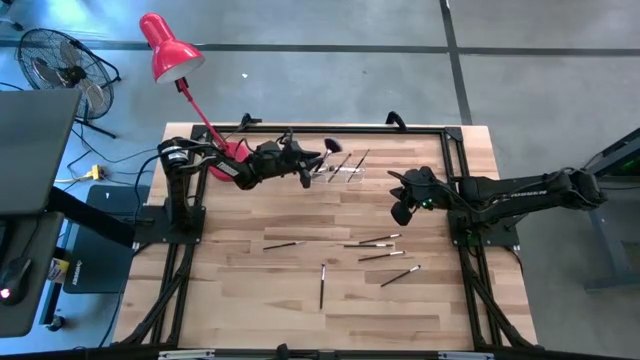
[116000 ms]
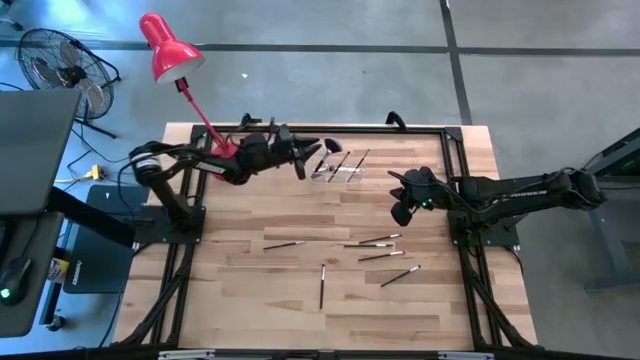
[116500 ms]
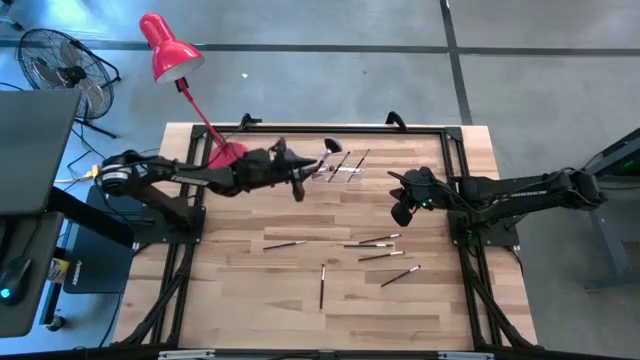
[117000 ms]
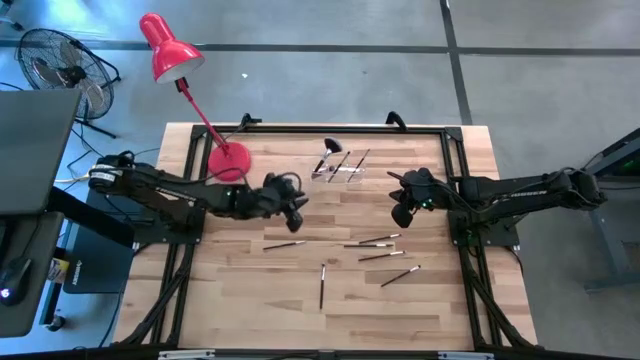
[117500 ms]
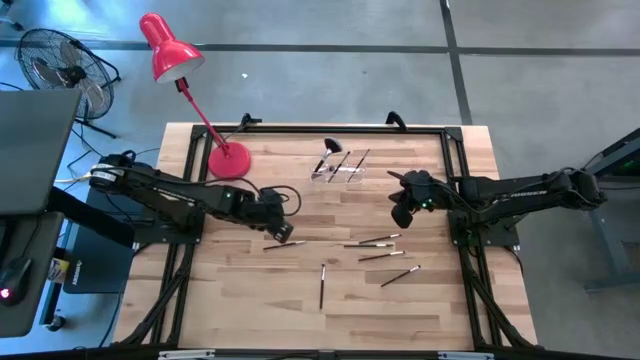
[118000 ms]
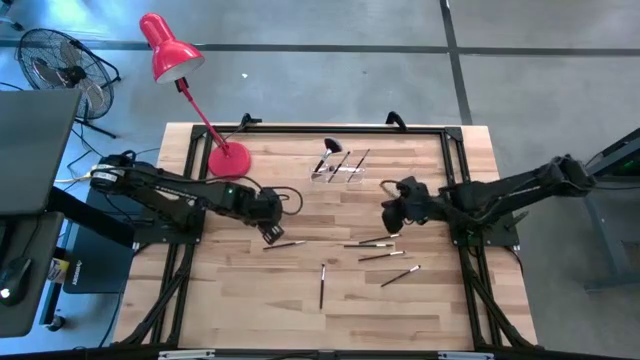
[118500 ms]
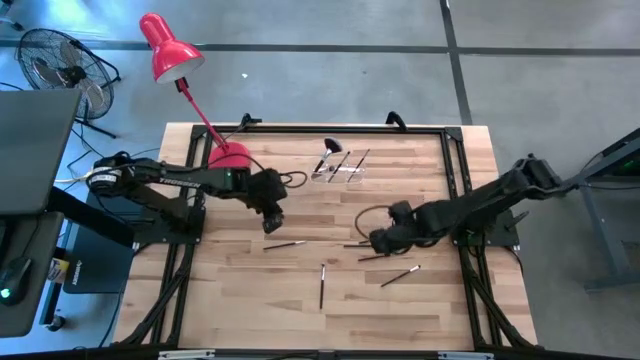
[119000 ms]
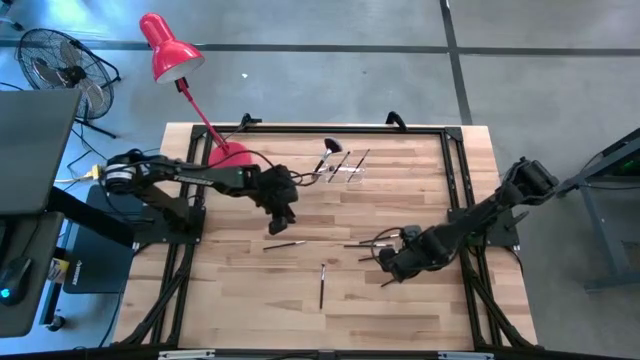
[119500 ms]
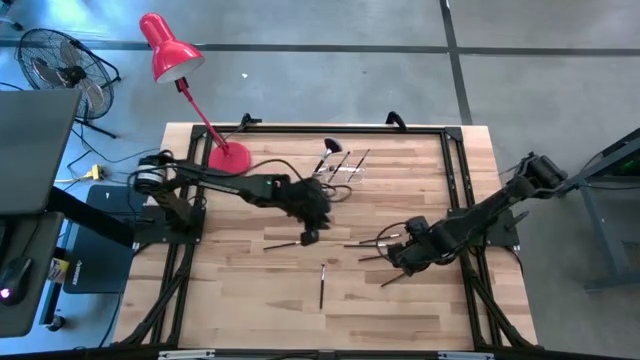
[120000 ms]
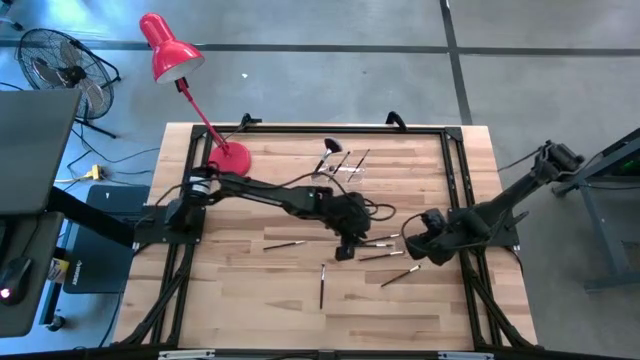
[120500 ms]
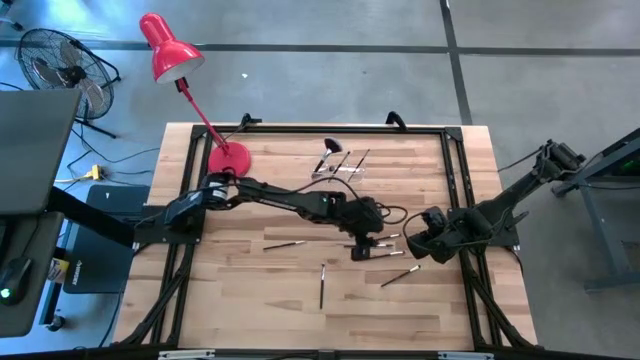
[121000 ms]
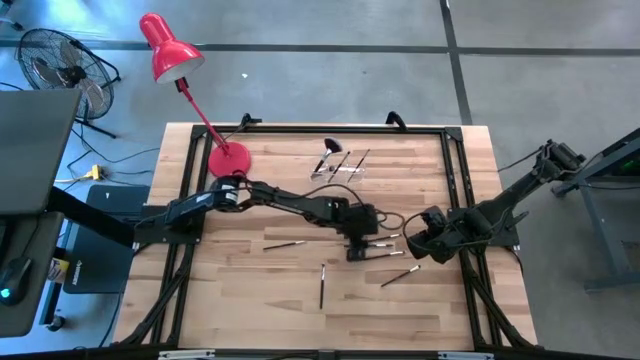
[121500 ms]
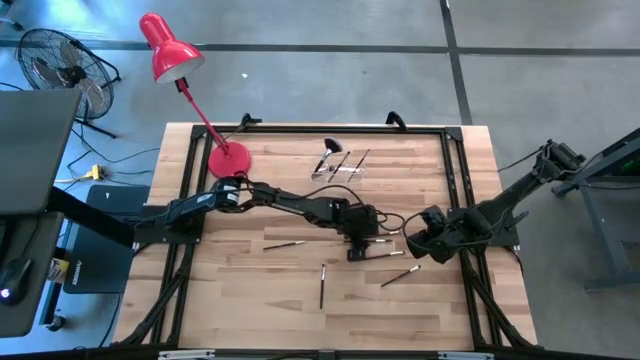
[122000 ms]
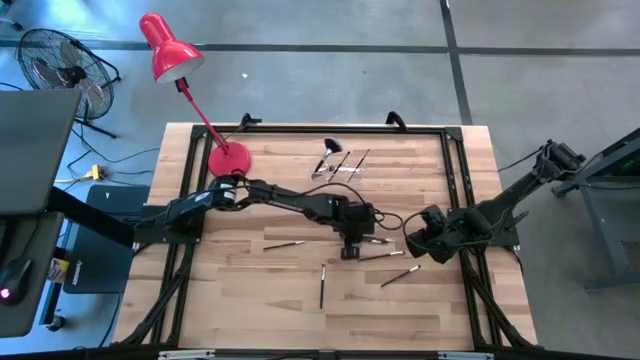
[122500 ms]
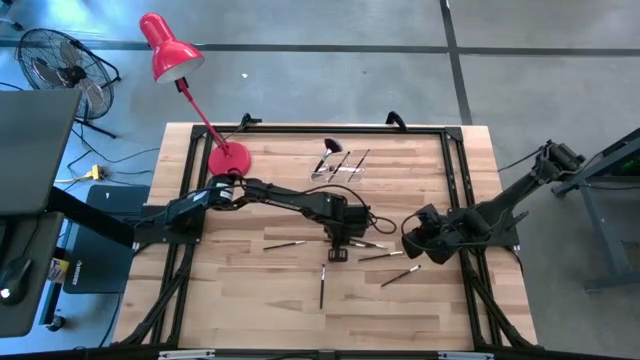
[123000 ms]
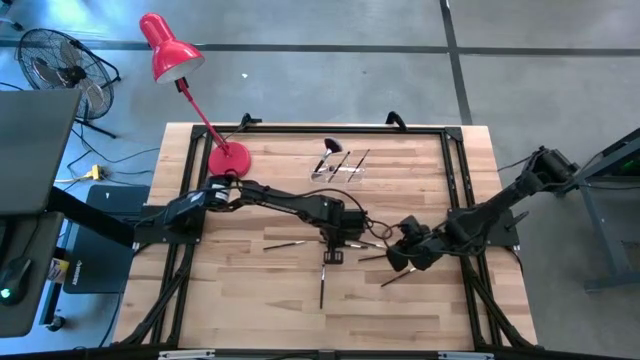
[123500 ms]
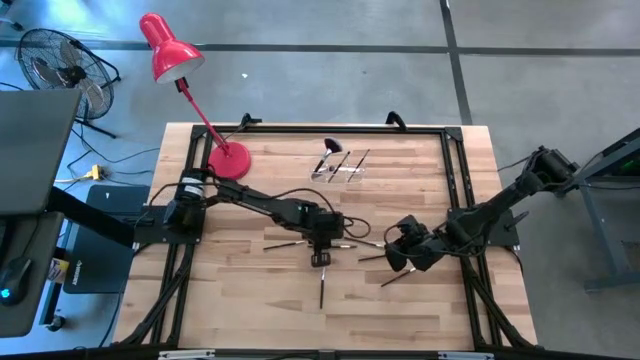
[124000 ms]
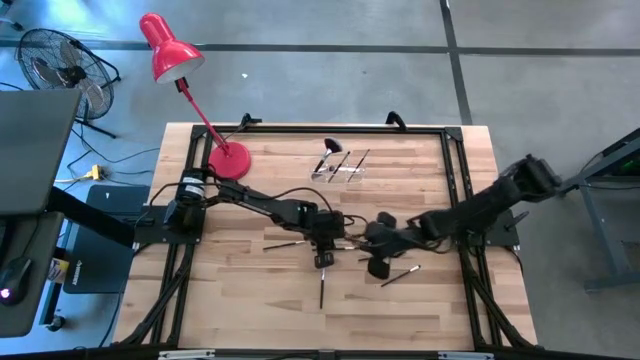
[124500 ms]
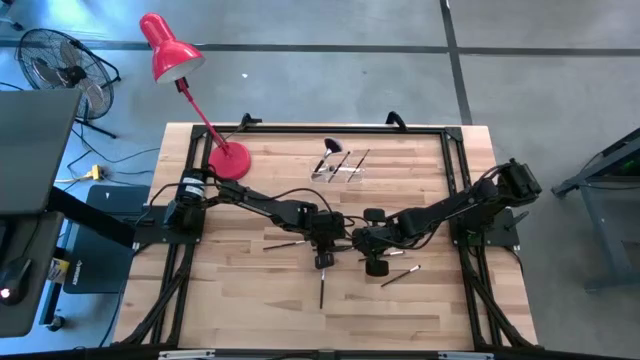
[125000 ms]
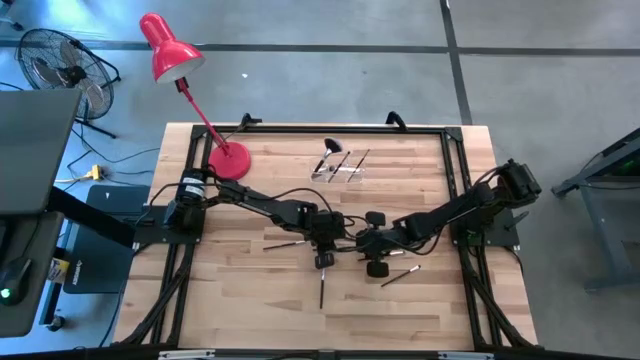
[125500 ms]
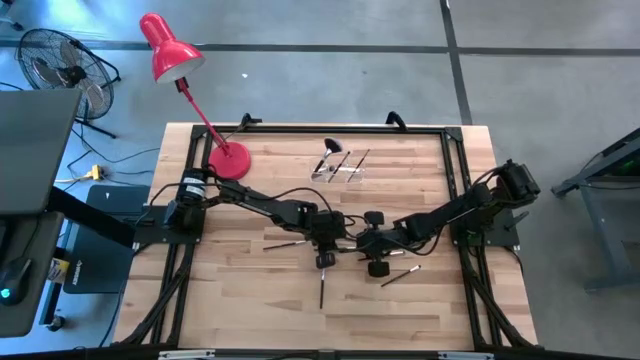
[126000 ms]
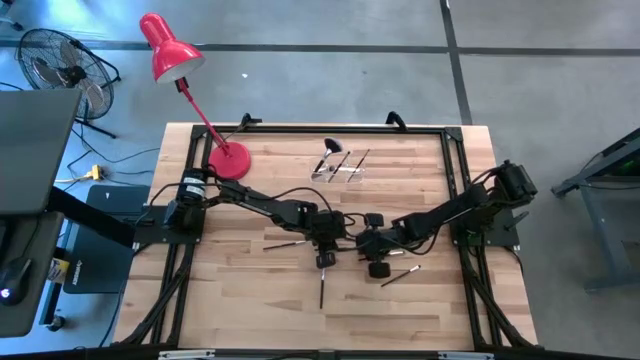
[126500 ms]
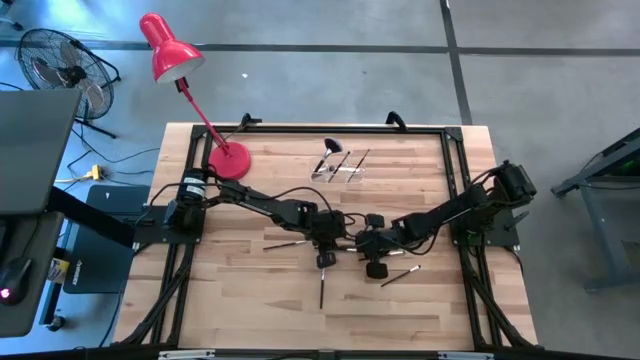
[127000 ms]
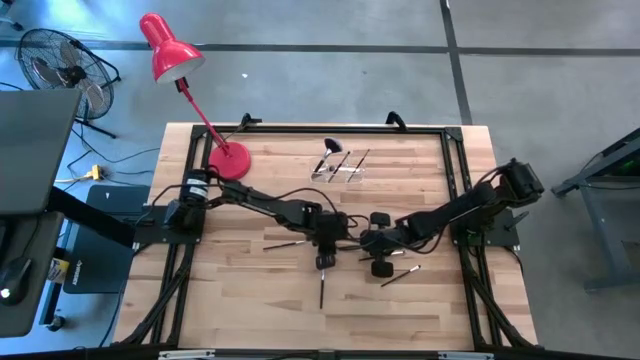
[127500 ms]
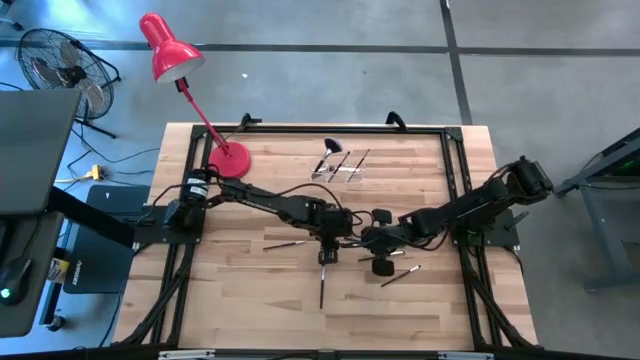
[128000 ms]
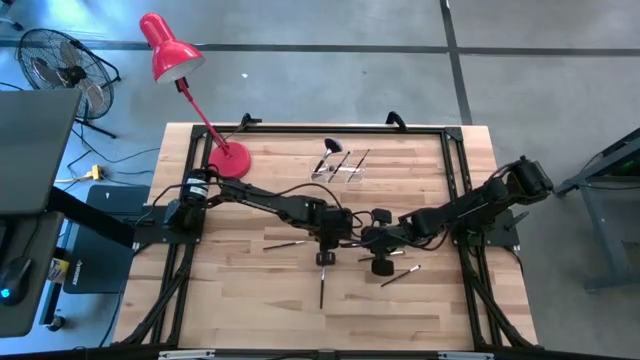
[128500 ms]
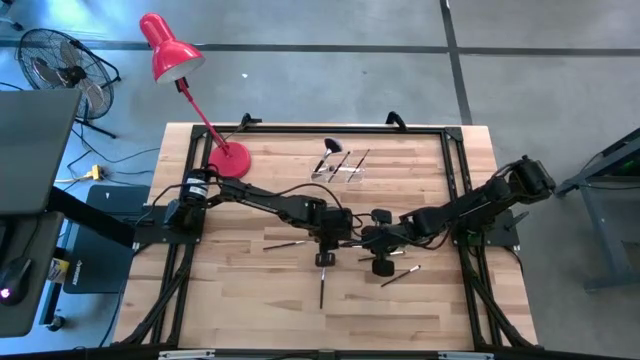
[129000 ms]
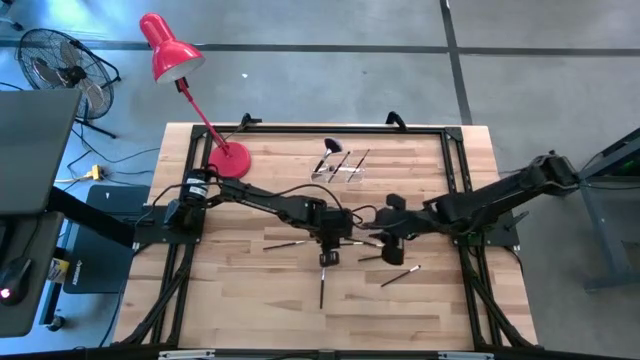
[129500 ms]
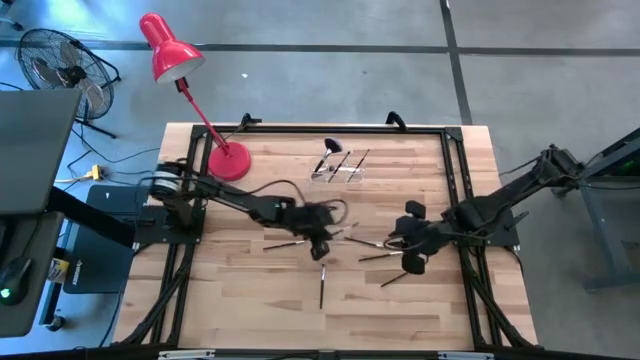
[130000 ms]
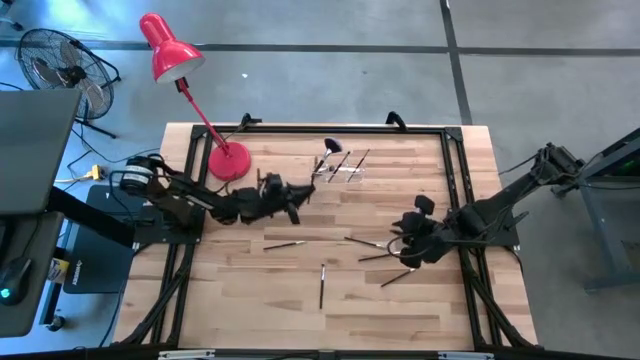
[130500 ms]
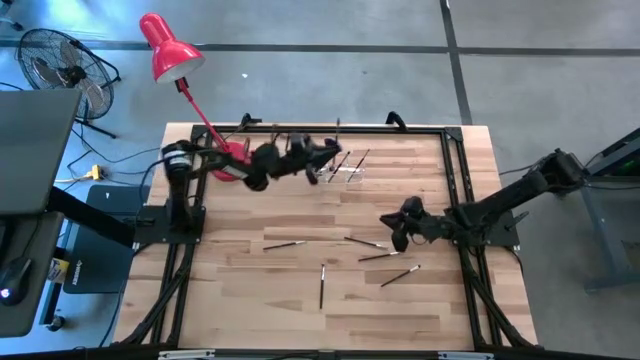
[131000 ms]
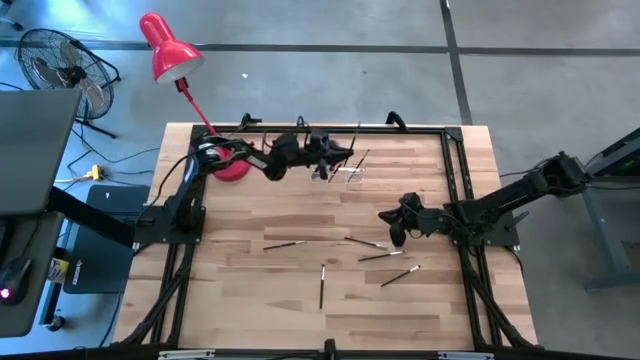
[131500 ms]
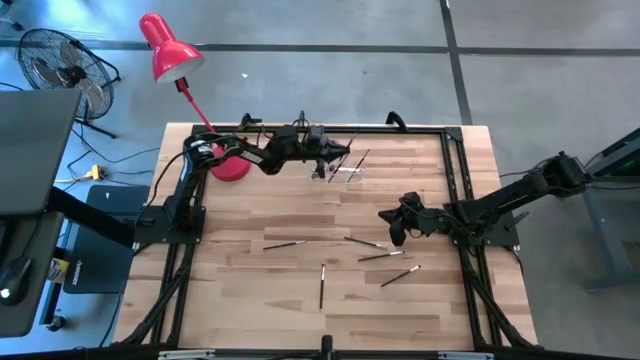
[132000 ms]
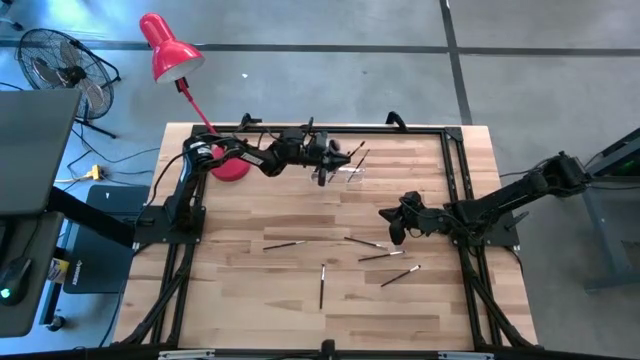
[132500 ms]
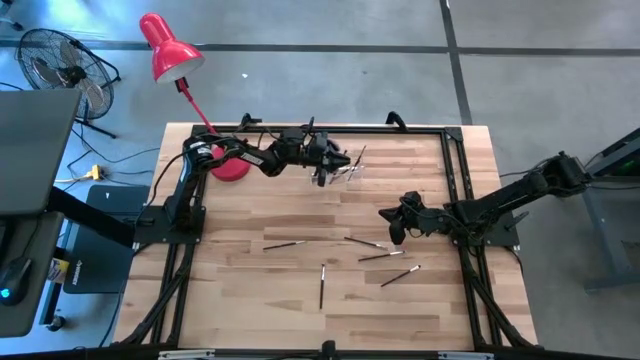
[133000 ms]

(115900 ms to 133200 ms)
Task: Put items in baskets/containers
Put the lash brush into the transparent organizer

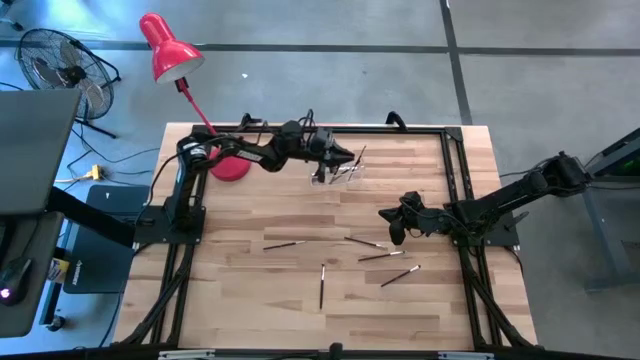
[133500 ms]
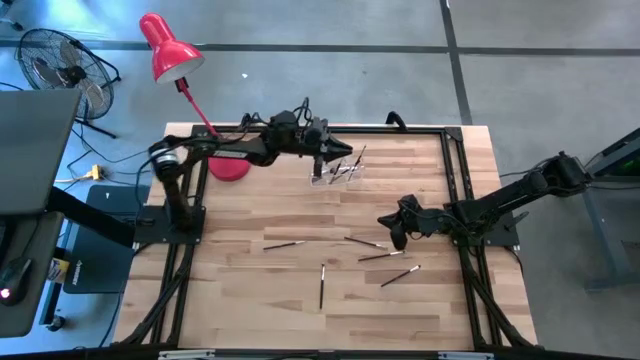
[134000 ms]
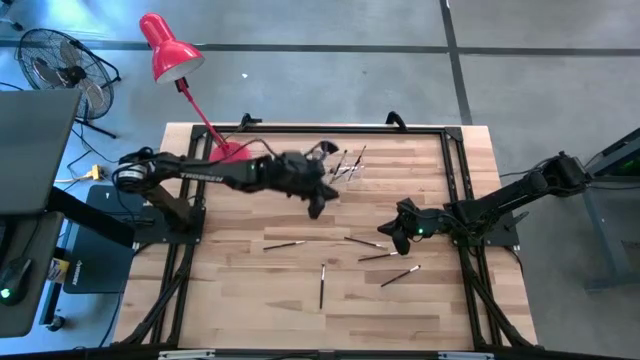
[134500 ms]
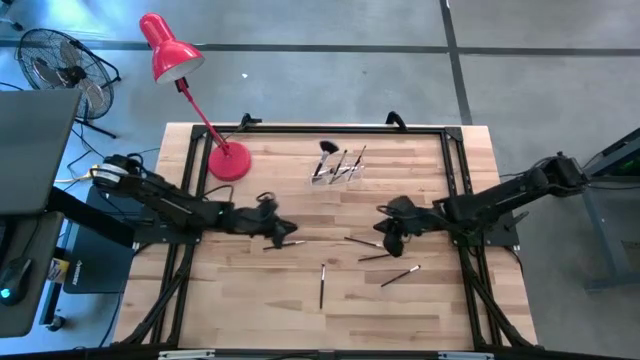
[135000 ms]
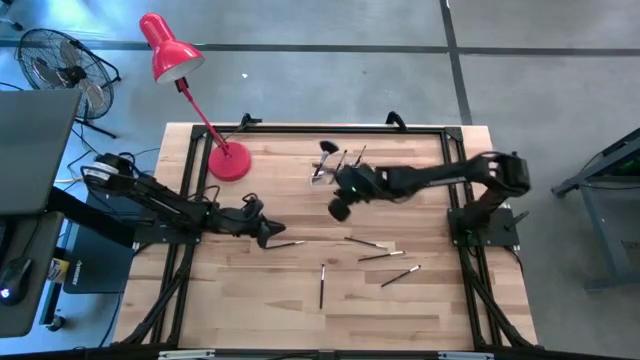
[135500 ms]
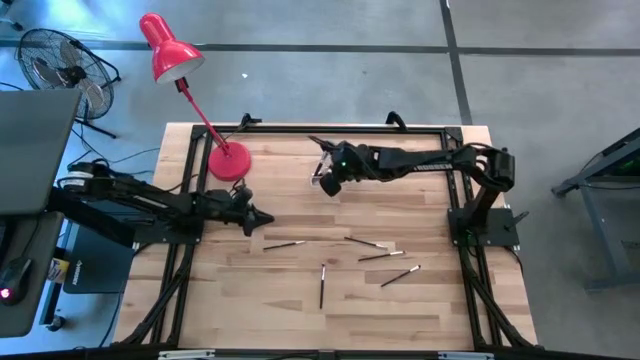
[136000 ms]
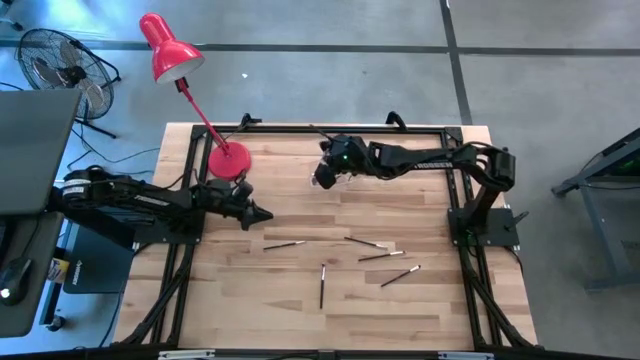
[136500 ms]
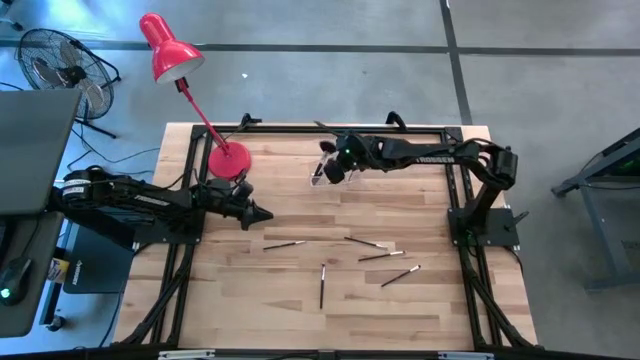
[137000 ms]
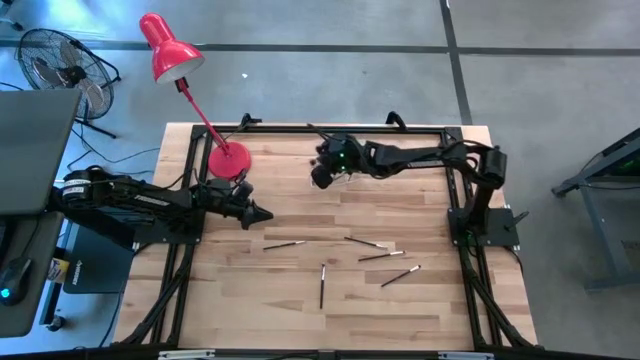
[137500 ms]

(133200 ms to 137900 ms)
Adjust the foundation brush in the transparent organizer
